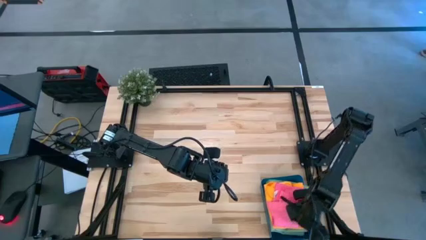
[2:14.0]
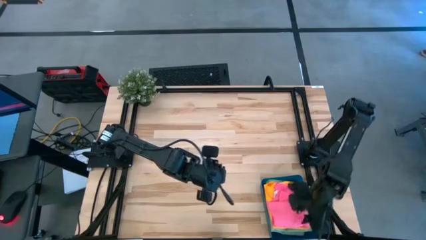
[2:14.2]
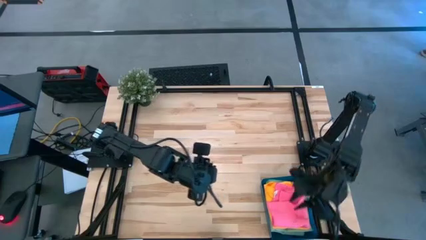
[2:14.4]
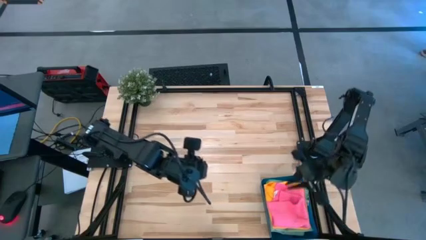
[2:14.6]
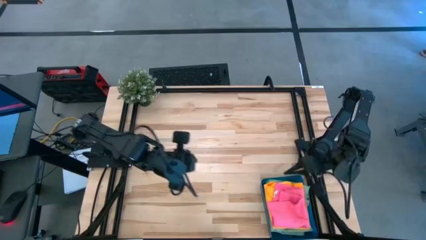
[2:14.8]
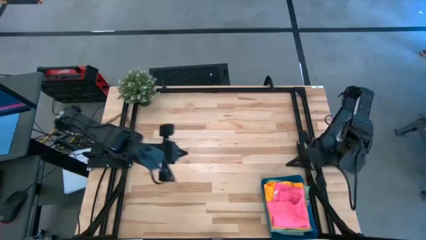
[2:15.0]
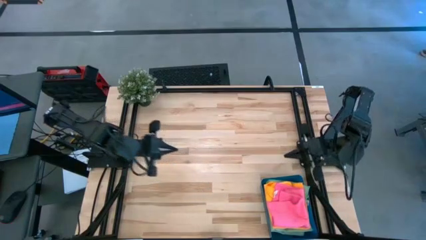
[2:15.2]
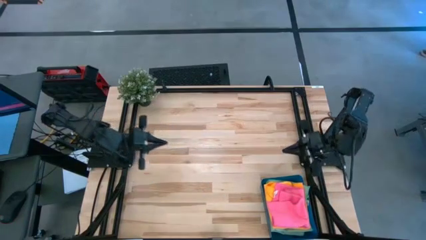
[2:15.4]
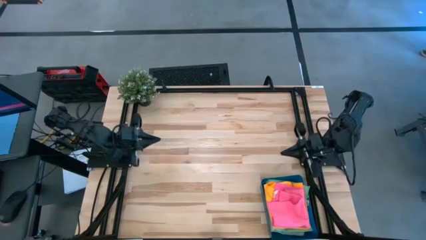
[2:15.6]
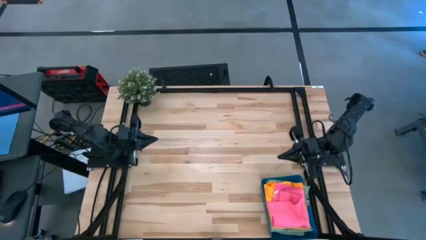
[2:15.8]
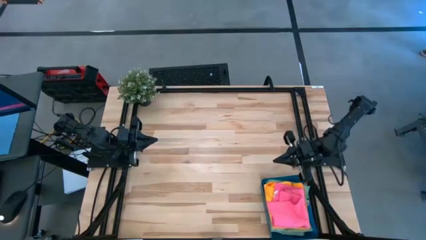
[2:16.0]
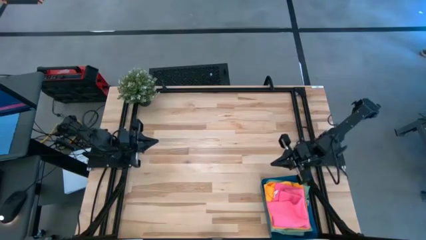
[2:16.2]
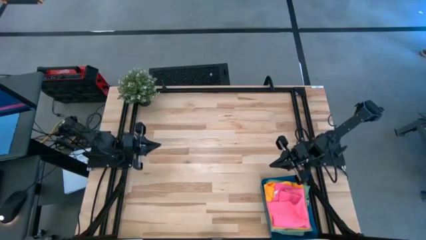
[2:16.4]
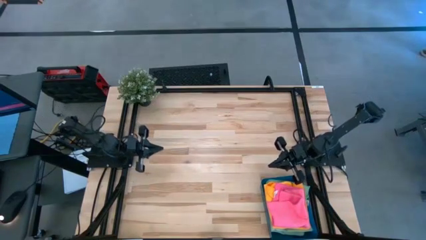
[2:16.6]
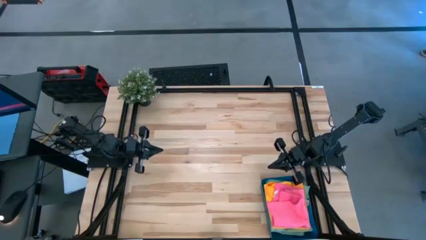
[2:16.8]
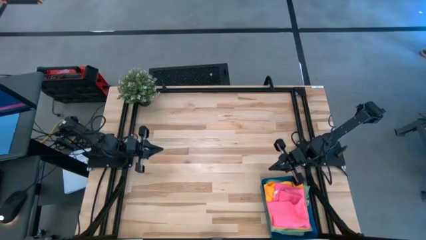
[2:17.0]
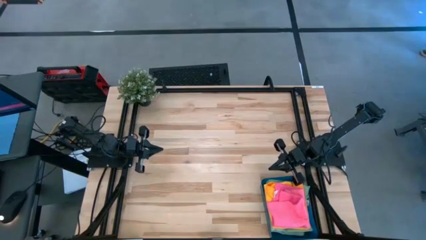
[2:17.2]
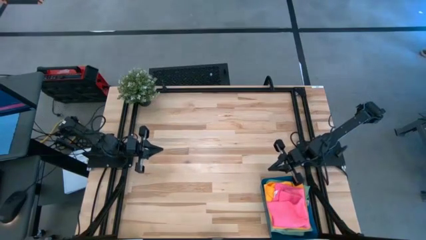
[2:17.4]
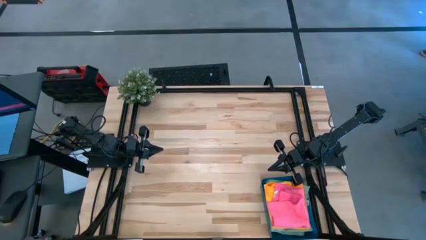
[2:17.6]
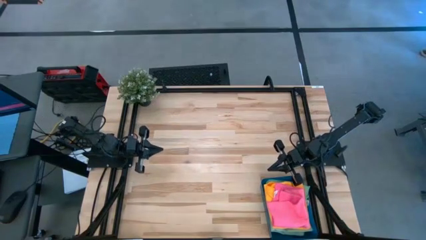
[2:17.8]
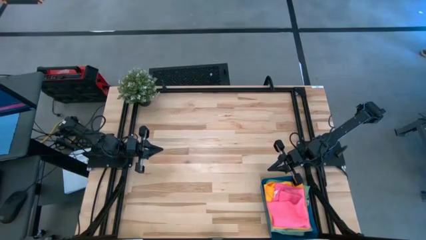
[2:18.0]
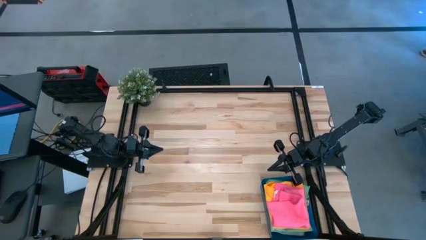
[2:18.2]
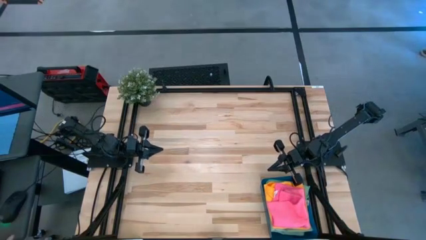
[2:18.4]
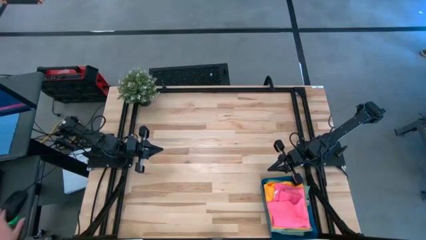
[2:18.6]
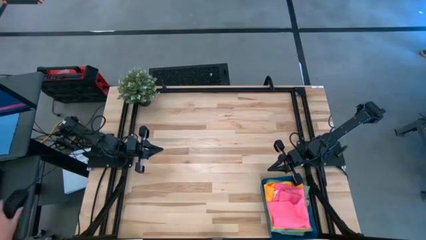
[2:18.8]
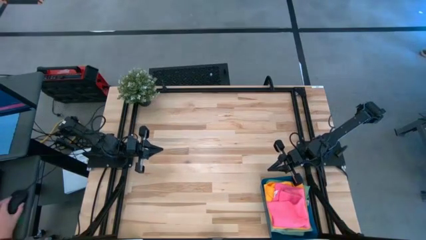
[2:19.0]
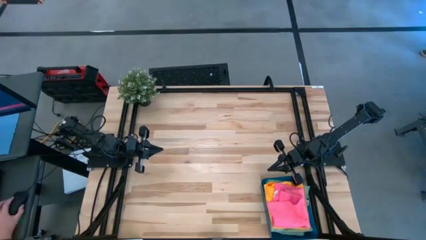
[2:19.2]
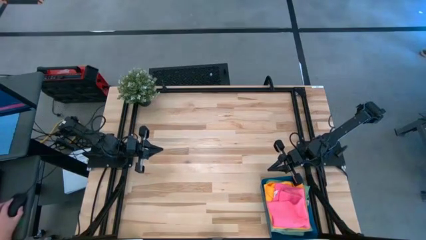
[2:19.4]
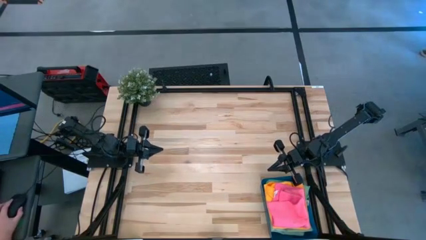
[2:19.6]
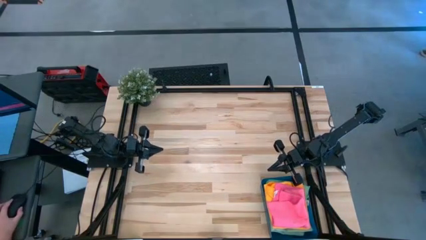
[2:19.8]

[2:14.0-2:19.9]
Task: Fold microfiber towels
Return to Home Position

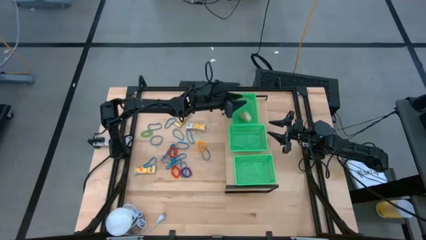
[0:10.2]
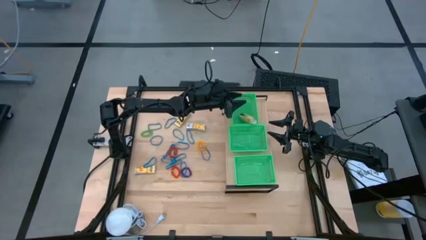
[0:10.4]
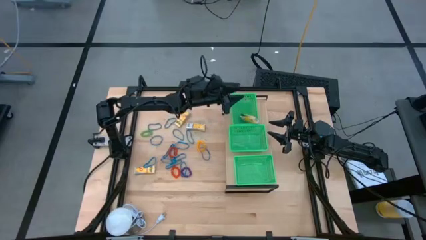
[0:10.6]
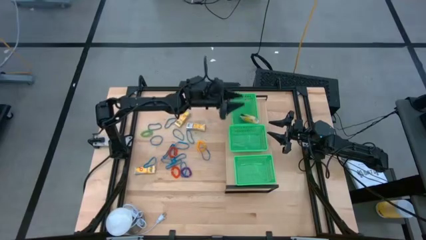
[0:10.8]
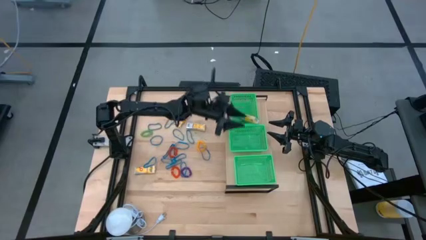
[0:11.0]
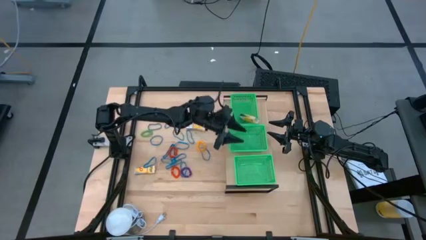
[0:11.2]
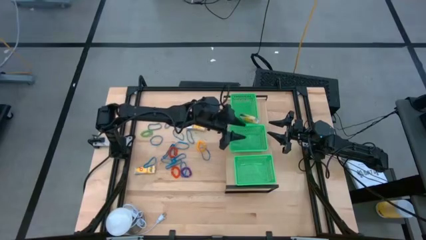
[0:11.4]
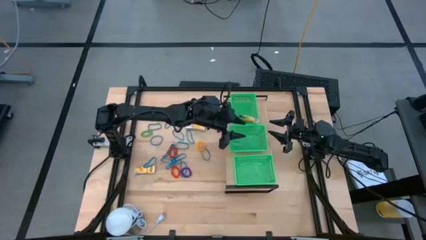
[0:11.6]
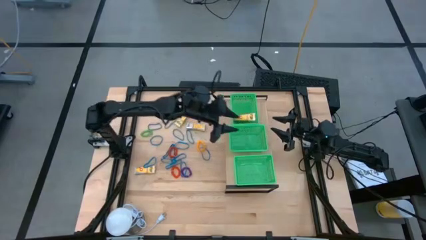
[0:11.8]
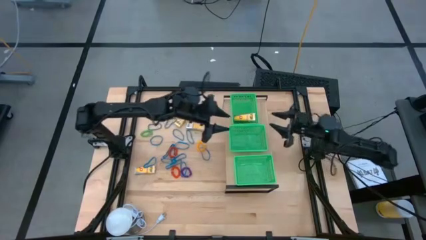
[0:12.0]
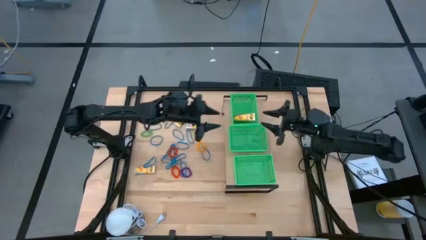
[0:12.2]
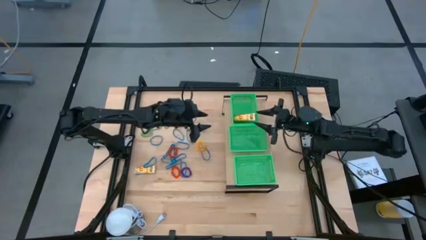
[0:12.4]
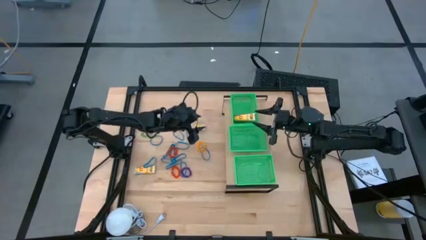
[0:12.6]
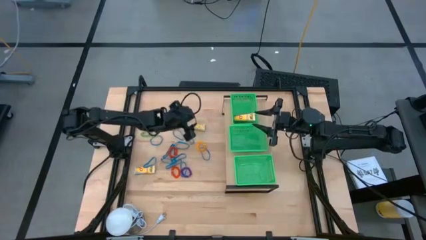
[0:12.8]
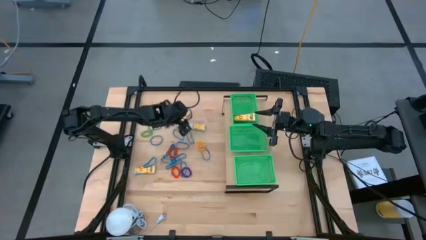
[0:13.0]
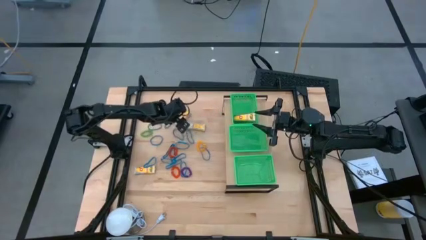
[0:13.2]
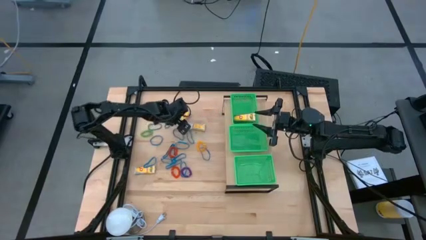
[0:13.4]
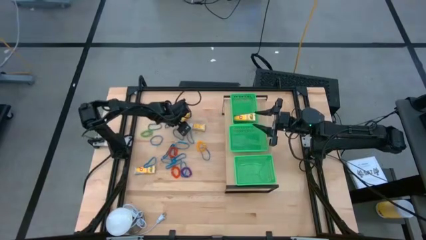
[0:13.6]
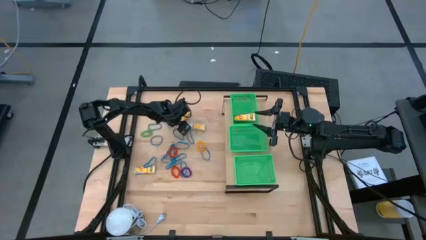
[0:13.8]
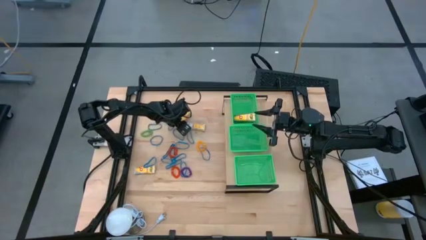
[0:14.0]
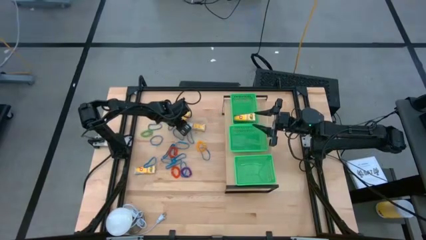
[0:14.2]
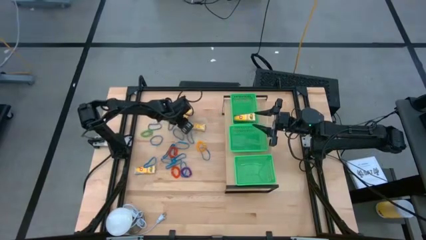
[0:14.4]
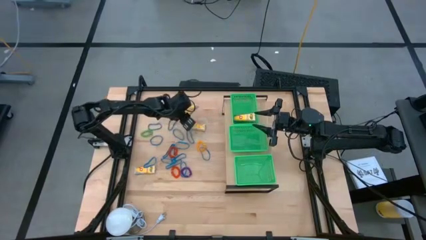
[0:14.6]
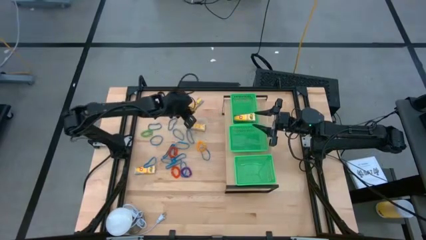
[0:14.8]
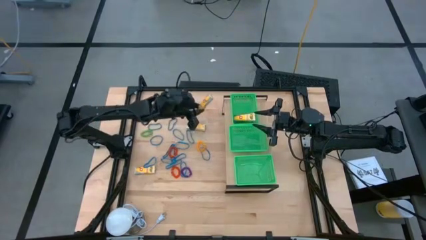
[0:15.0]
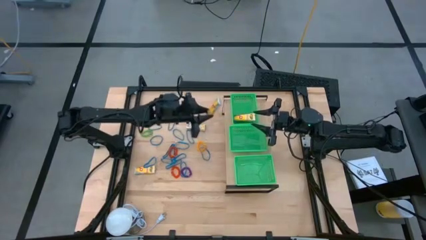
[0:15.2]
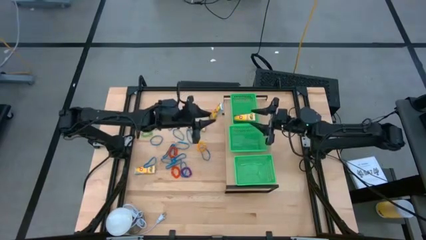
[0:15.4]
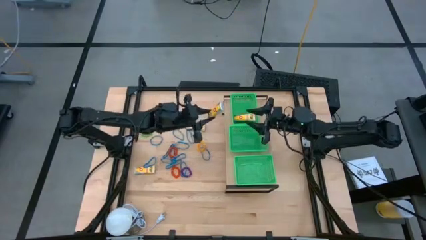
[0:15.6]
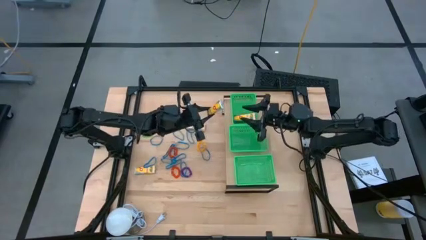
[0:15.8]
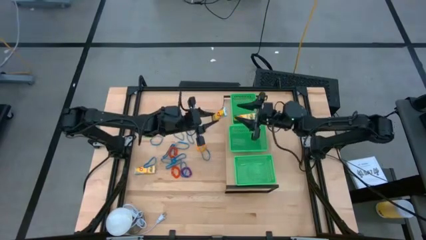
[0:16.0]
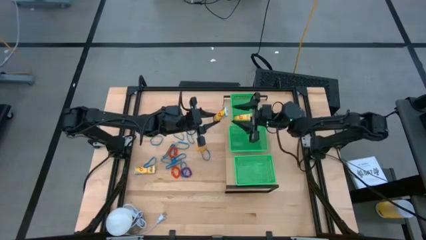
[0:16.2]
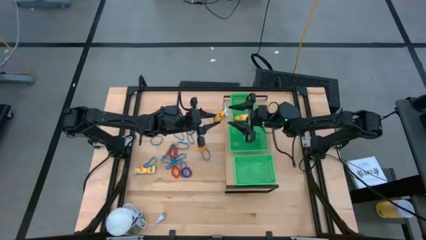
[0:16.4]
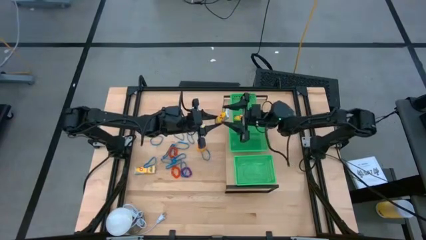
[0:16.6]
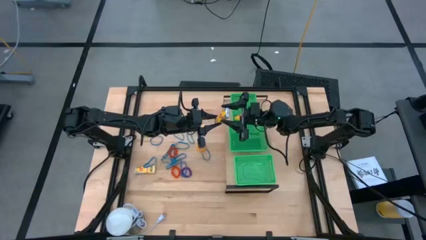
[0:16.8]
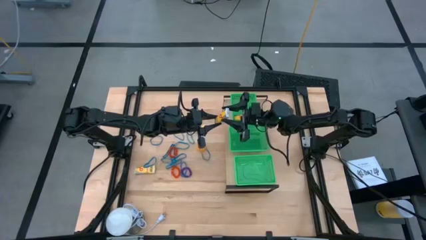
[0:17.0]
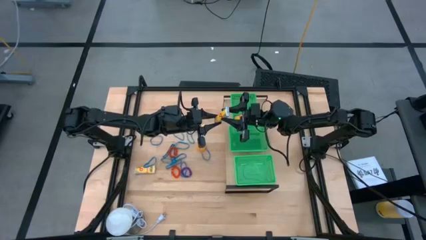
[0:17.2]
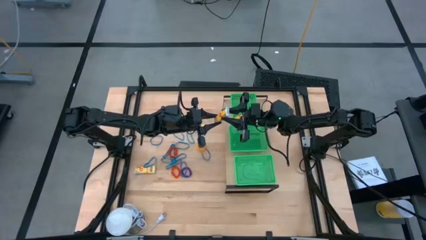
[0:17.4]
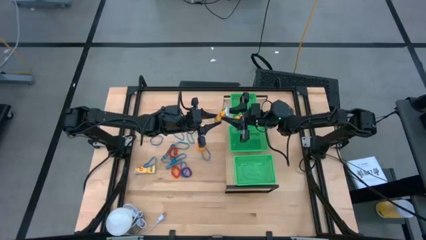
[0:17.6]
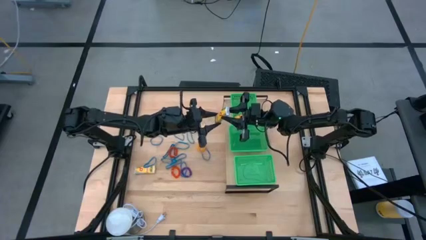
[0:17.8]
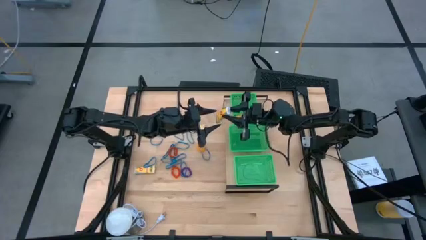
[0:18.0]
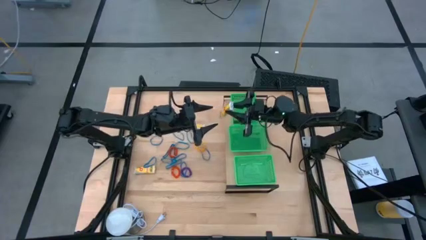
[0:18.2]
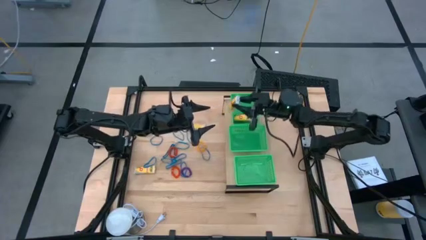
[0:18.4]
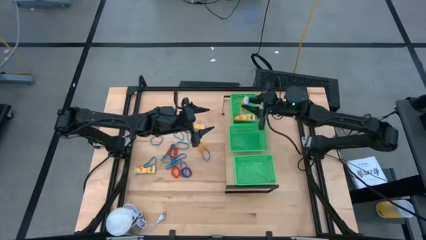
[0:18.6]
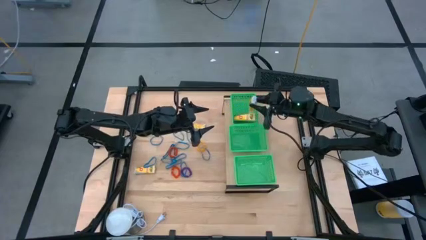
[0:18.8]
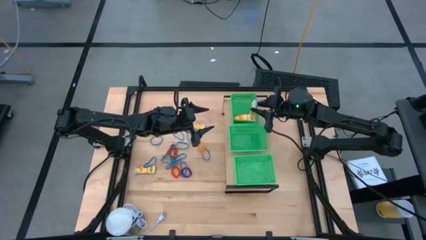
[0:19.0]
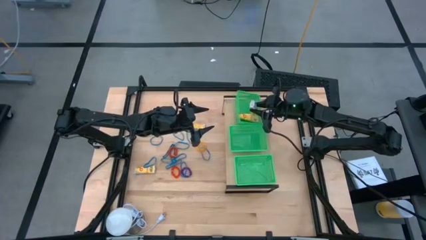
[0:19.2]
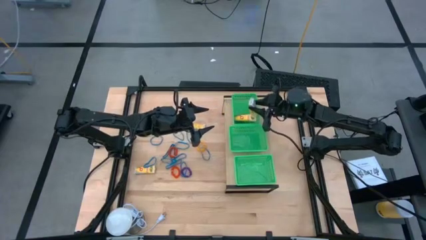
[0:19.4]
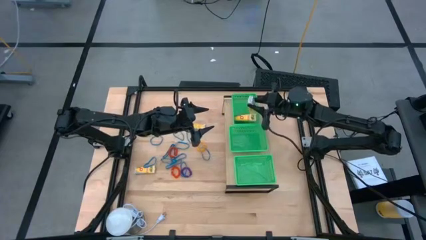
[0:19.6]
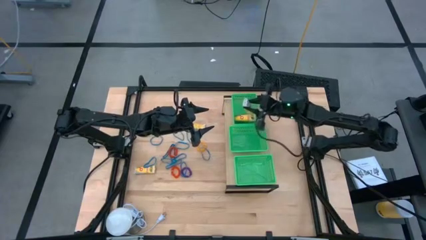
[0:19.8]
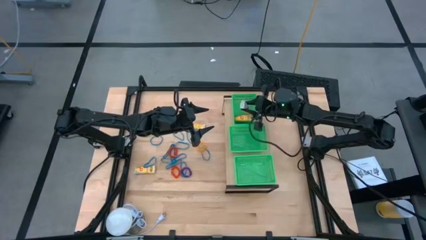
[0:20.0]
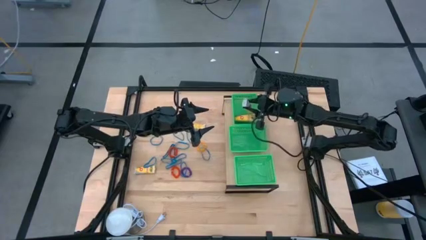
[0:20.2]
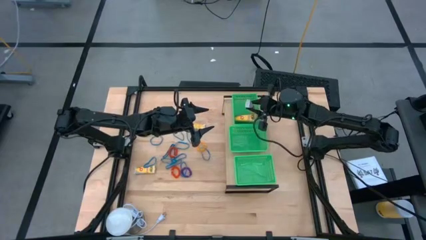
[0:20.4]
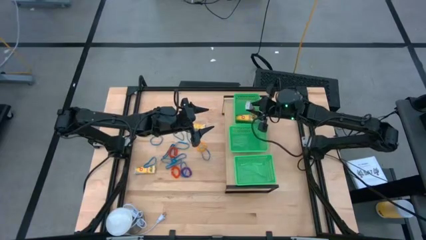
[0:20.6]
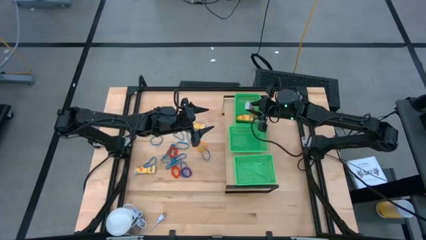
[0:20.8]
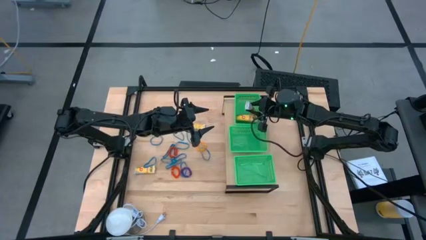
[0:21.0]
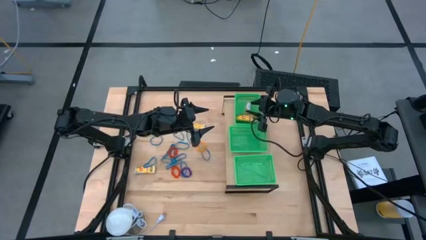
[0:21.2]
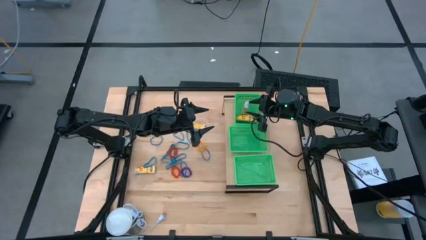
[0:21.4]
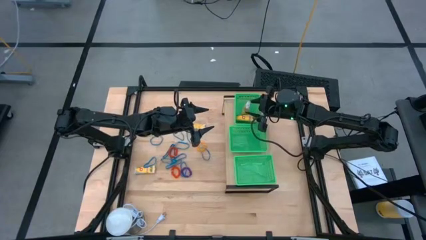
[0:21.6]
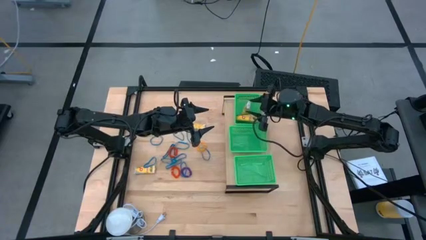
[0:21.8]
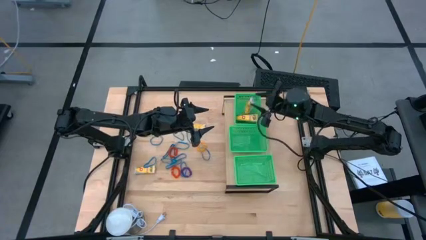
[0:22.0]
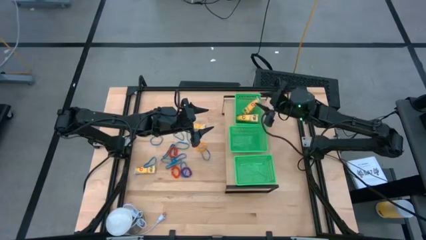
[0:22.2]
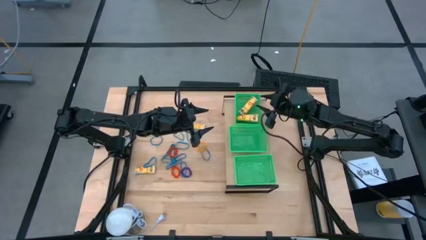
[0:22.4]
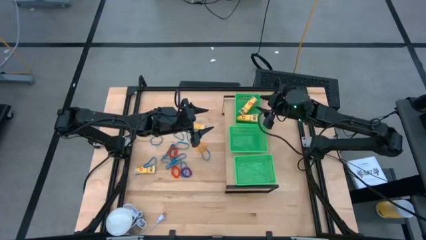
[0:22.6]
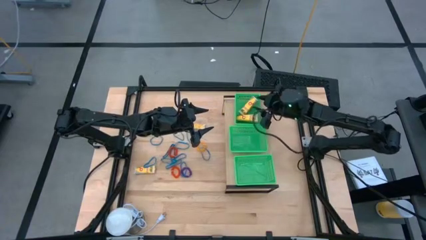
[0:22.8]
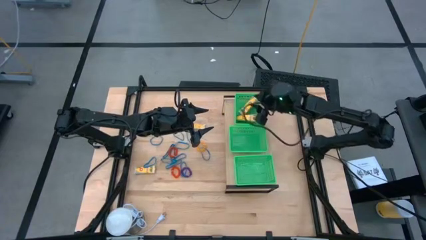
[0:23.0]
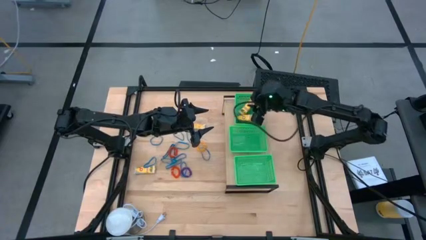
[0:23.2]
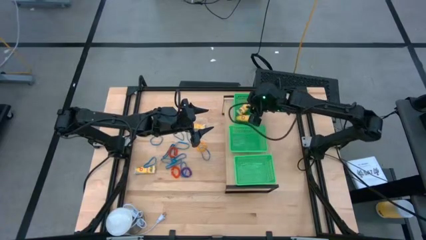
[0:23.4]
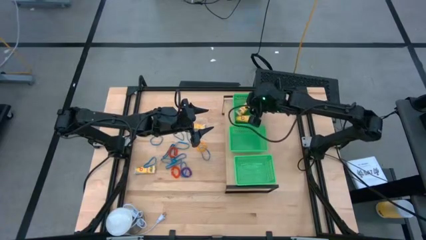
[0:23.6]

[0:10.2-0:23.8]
Task: Pick & Place Office Desk Supplies
Put the yellow crayon box into the top green bin
